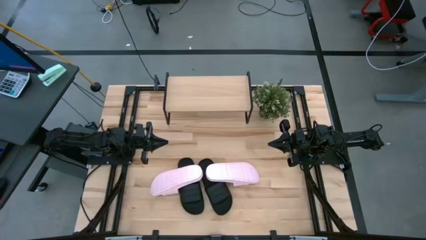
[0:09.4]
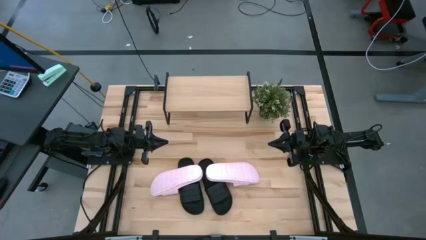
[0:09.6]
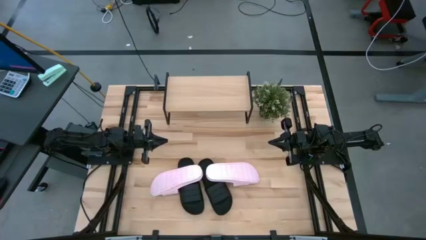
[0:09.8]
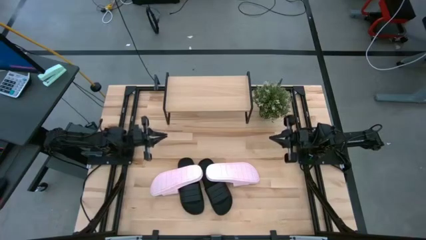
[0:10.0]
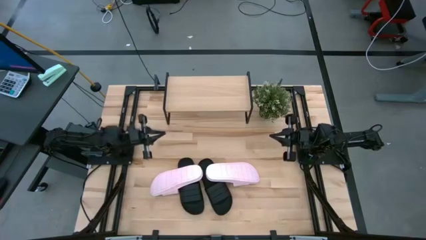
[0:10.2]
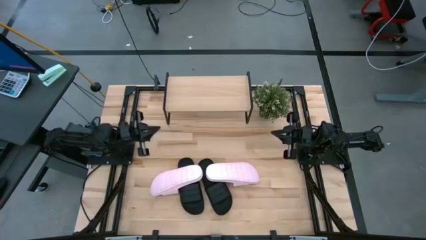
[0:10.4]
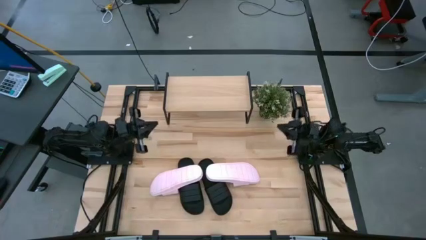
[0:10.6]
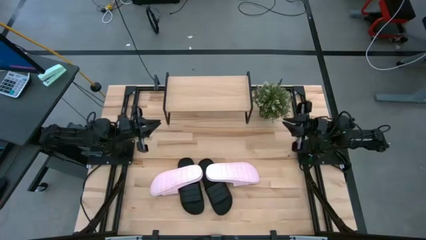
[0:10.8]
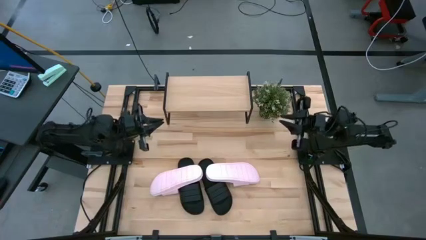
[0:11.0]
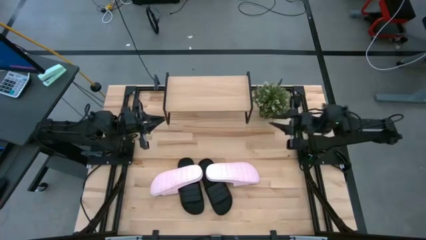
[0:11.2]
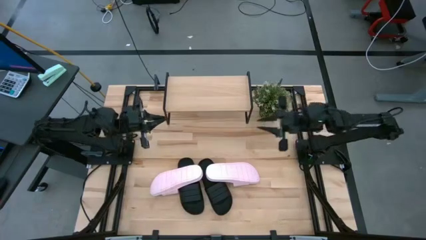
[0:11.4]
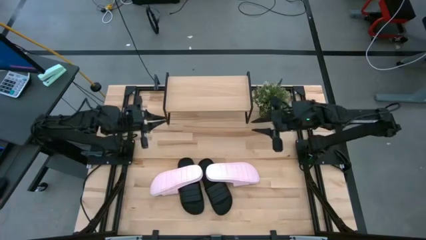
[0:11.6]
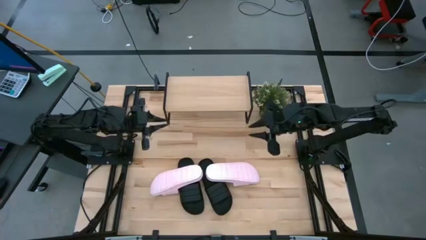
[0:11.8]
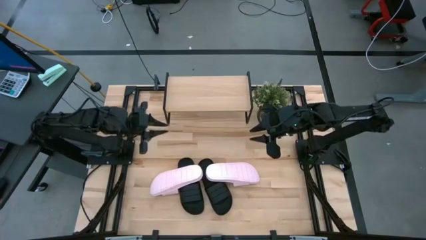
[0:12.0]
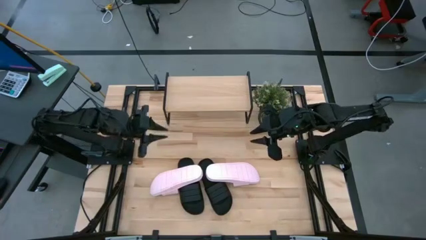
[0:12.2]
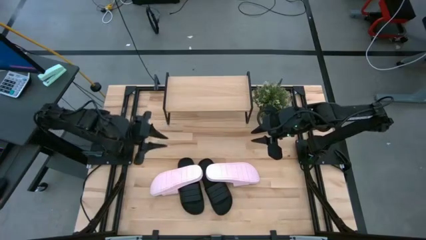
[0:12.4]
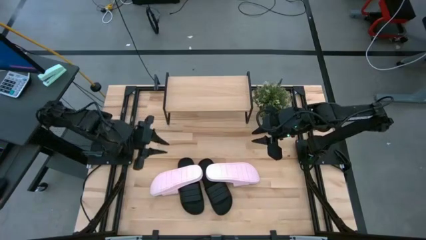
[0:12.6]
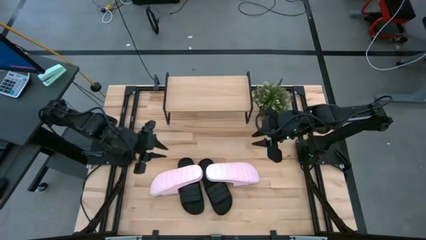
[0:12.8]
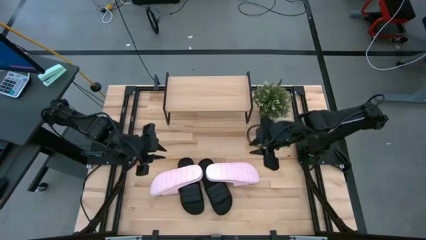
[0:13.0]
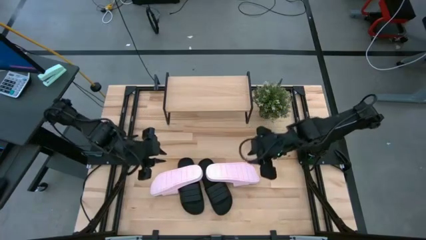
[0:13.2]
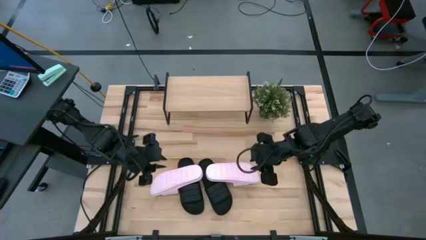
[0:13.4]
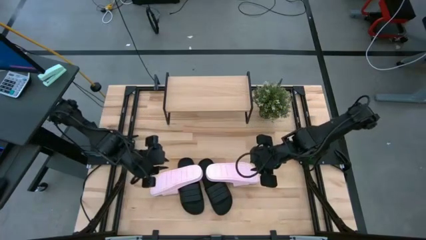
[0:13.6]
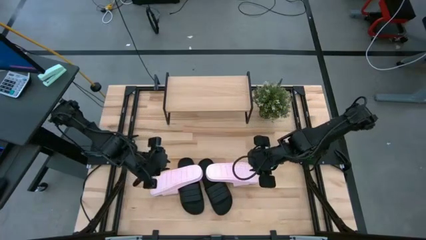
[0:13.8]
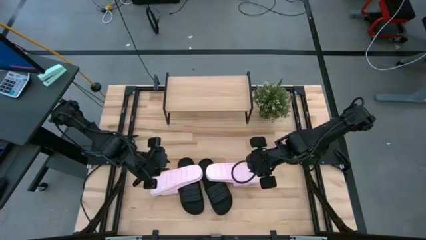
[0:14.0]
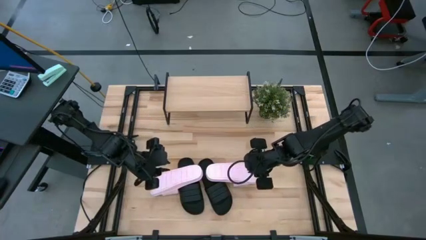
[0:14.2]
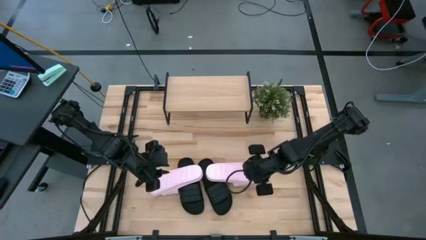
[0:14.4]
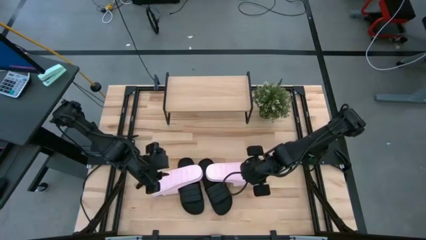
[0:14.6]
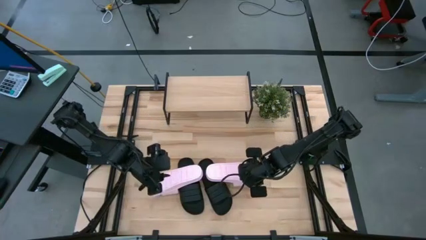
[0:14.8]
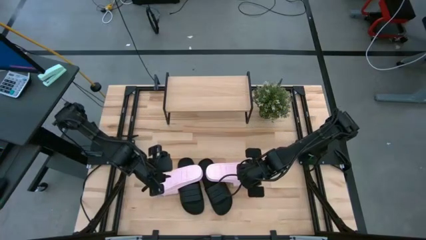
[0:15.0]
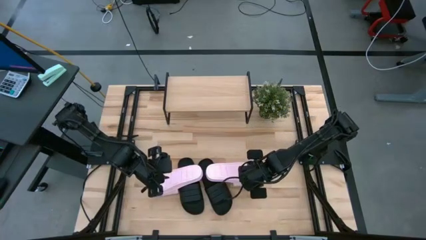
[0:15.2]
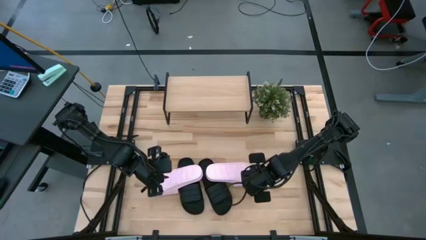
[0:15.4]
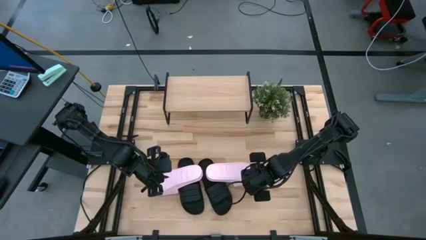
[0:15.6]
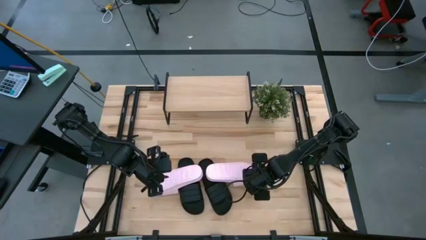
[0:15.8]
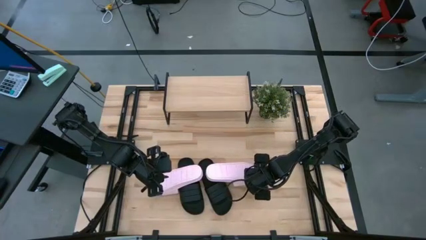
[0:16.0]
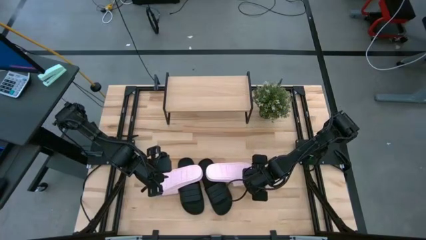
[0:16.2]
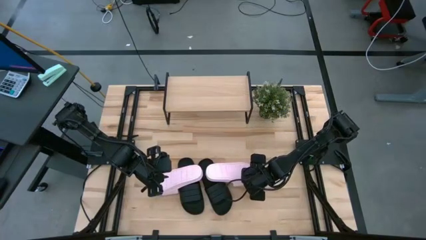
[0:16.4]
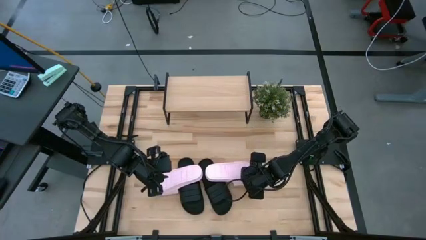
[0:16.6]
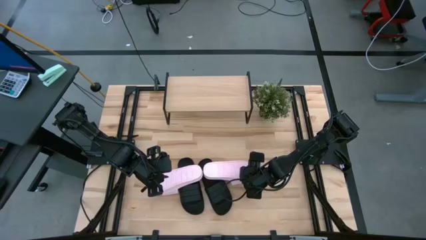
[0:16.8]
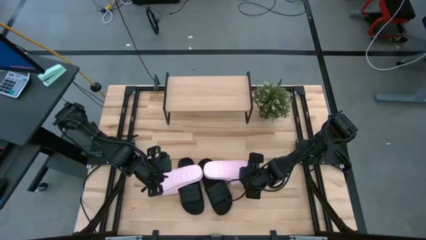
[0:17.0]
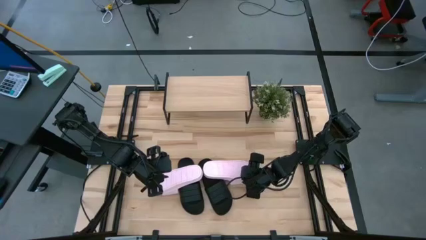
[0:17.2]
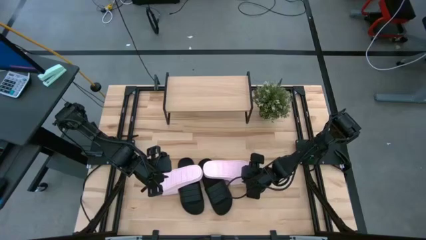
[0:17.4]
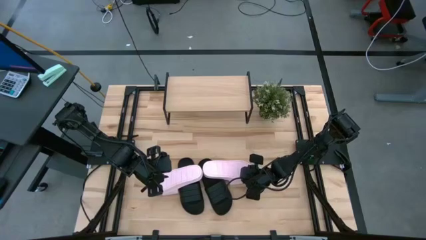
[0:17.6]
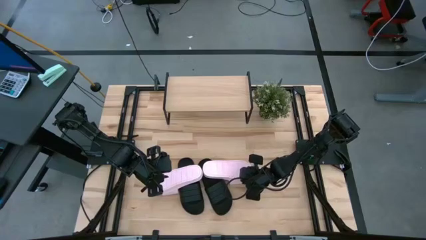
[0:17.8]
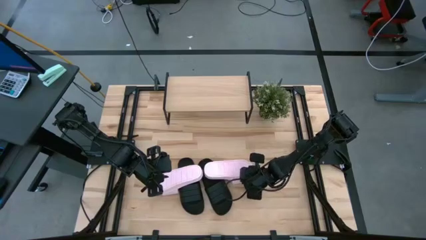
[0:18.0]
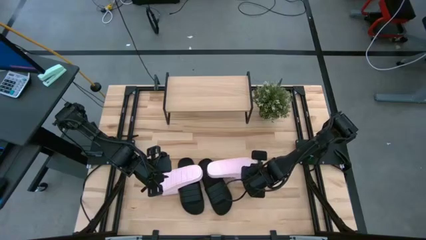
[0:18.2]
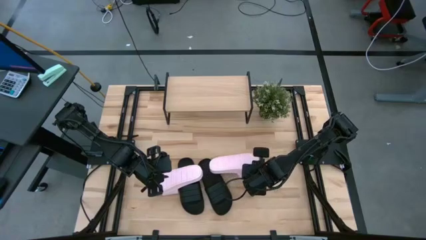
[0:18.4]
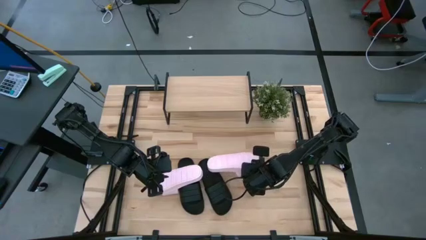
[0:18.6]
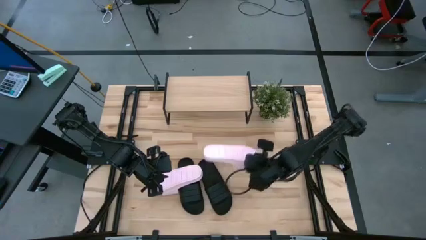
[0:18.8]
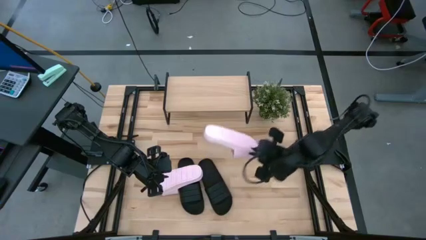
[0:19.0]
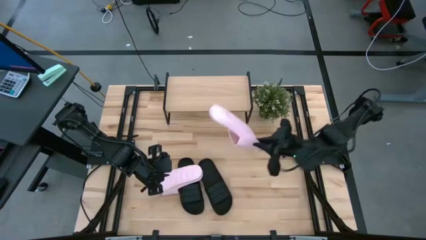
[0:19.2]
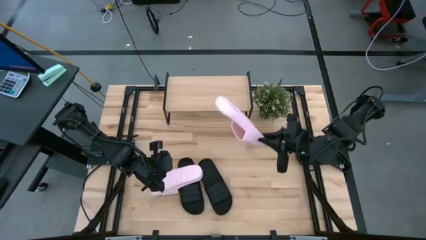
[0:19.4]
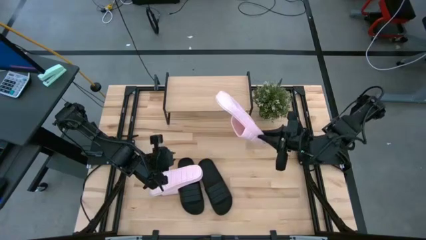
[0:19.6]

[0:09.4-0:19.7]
Task: Pick and place slides into the shelf
Put the right pink slide on the shelf
